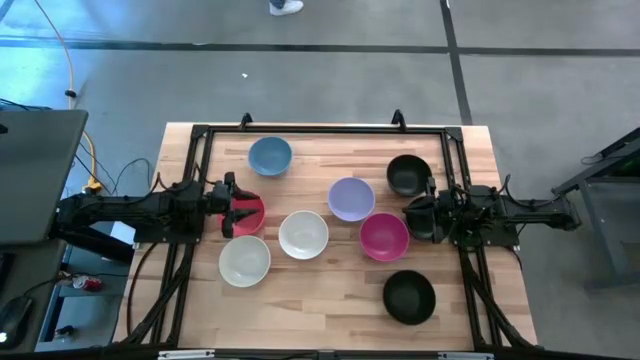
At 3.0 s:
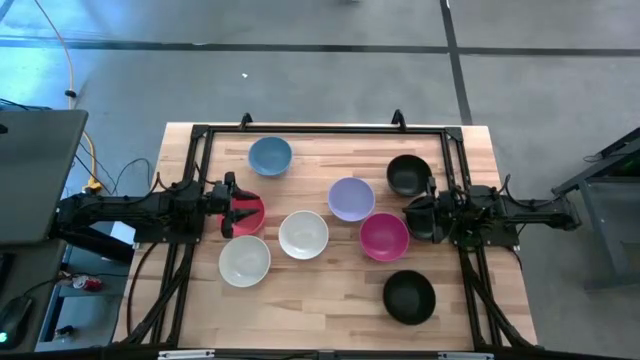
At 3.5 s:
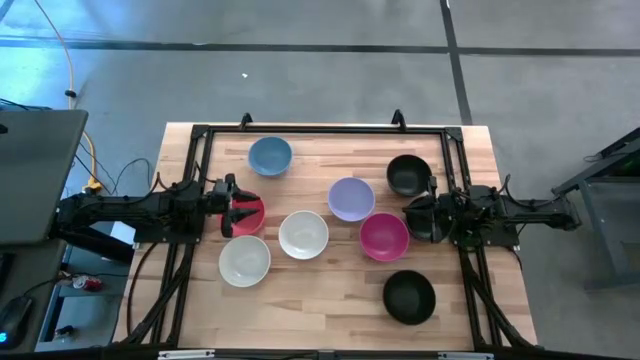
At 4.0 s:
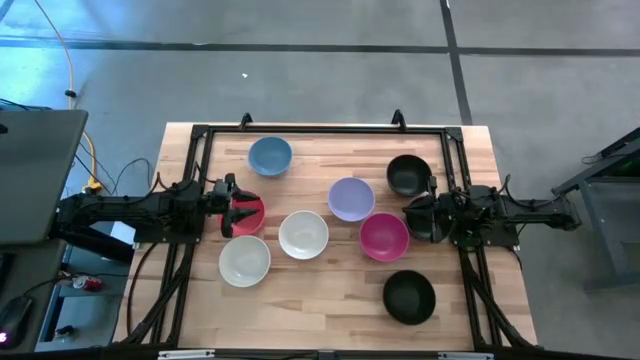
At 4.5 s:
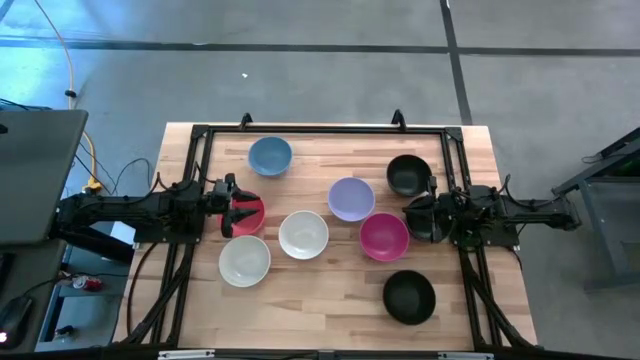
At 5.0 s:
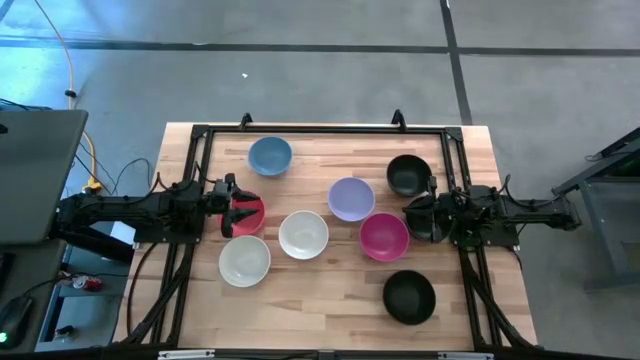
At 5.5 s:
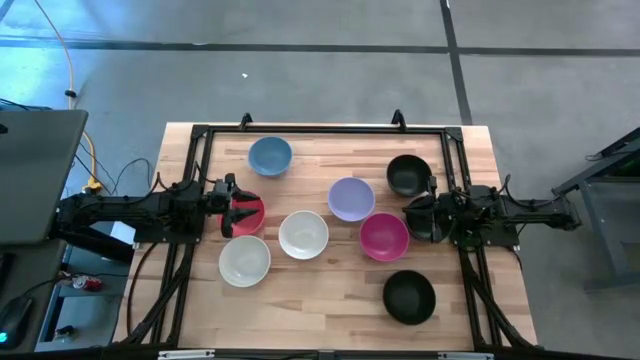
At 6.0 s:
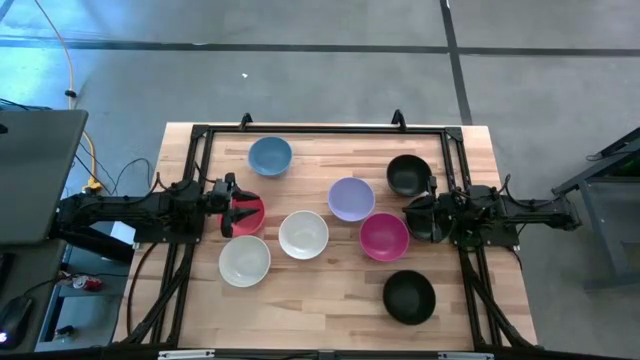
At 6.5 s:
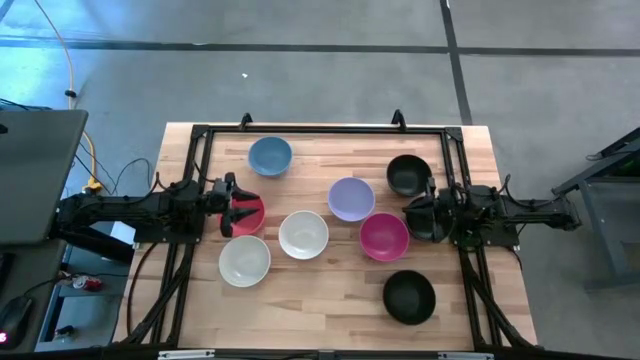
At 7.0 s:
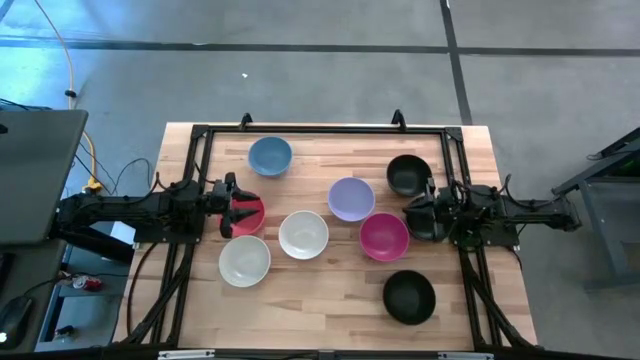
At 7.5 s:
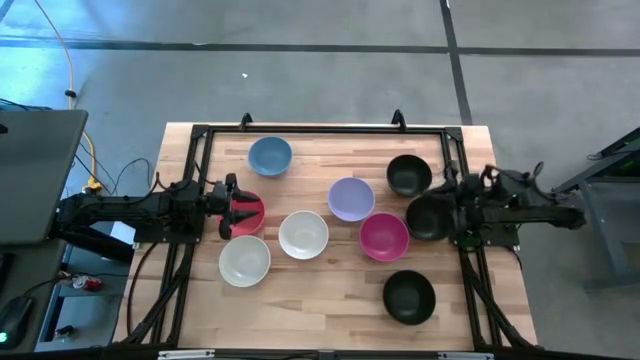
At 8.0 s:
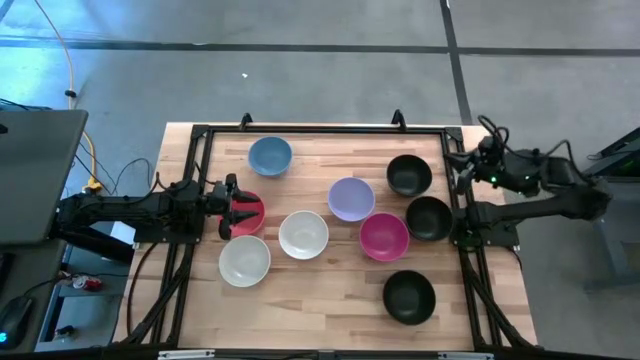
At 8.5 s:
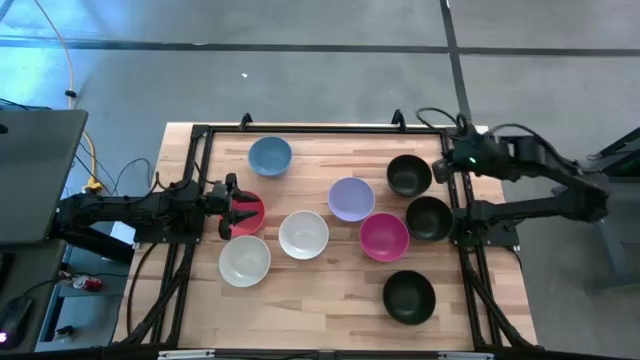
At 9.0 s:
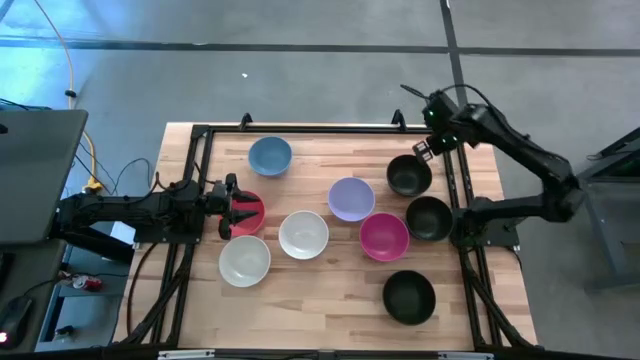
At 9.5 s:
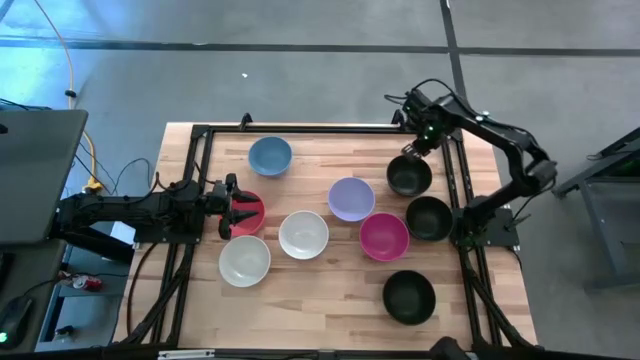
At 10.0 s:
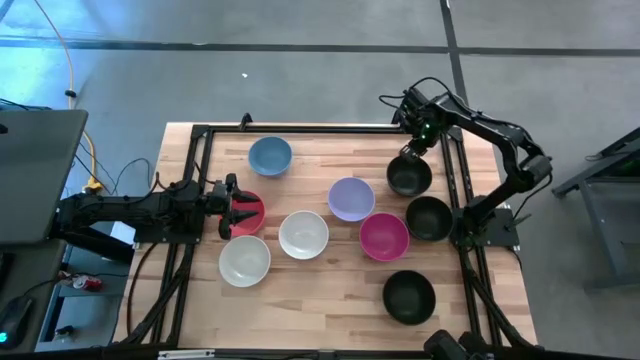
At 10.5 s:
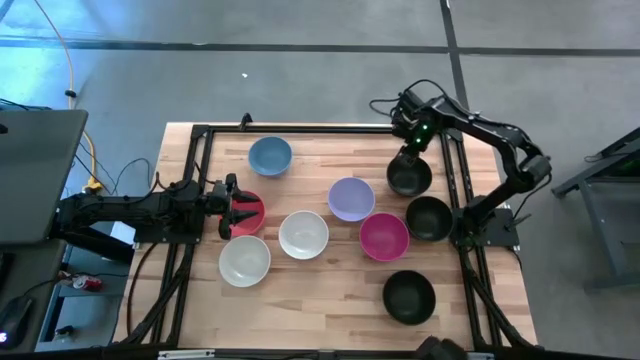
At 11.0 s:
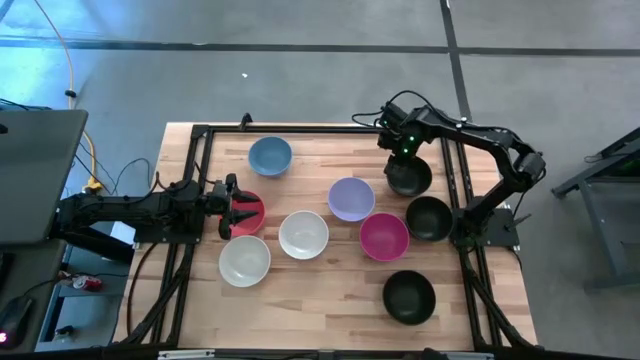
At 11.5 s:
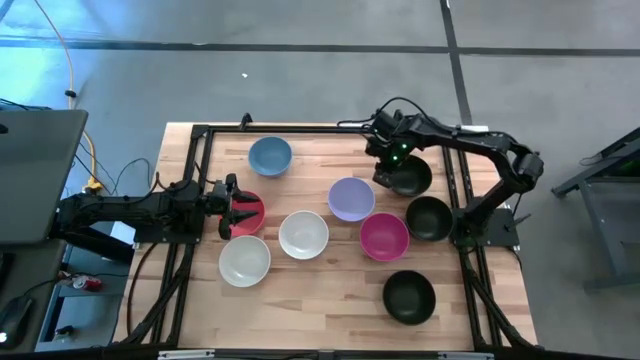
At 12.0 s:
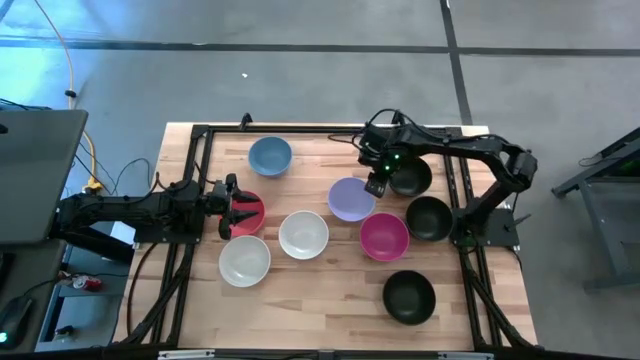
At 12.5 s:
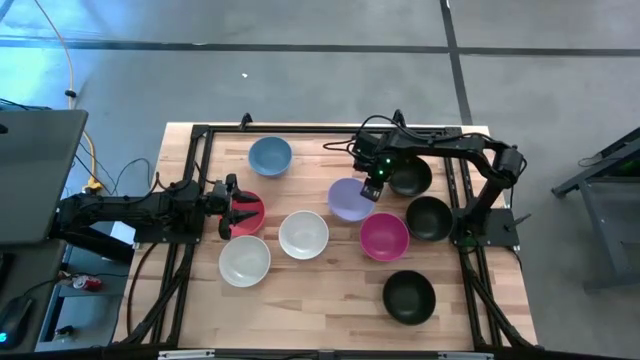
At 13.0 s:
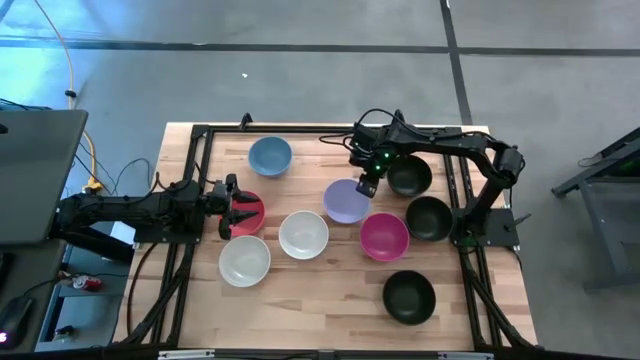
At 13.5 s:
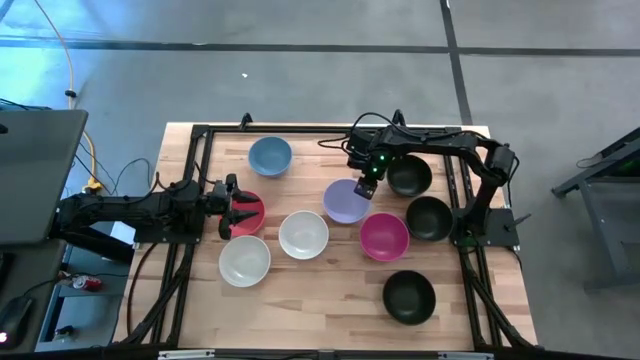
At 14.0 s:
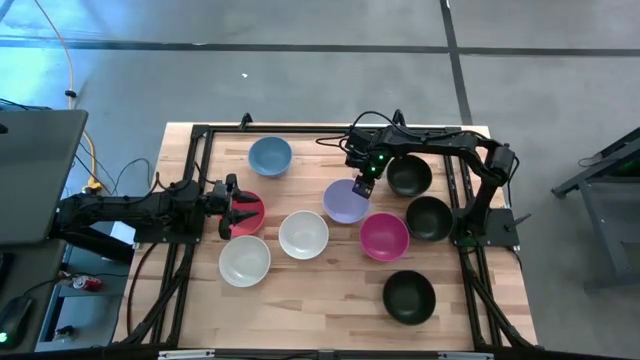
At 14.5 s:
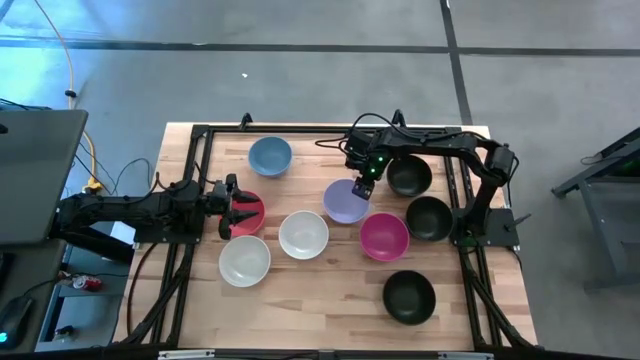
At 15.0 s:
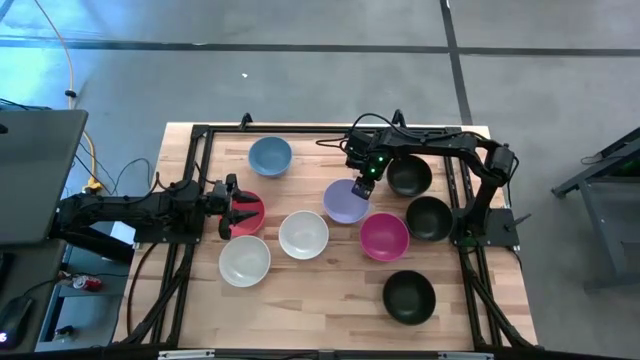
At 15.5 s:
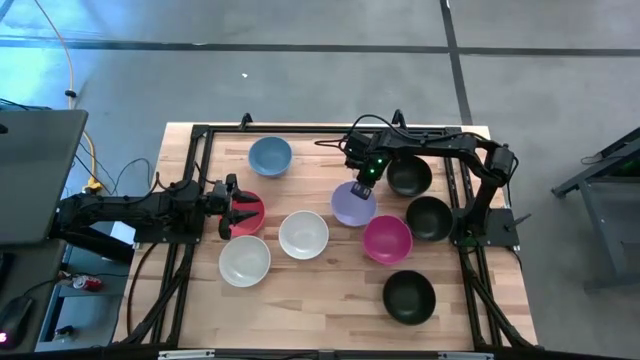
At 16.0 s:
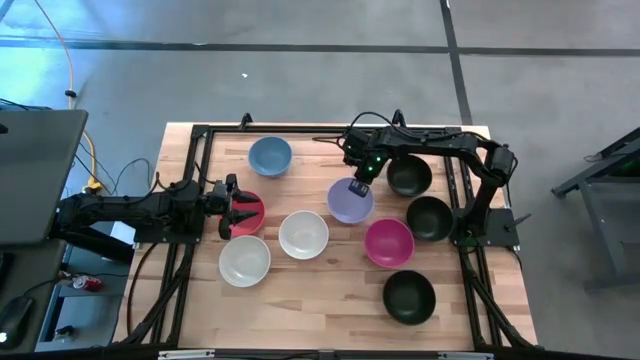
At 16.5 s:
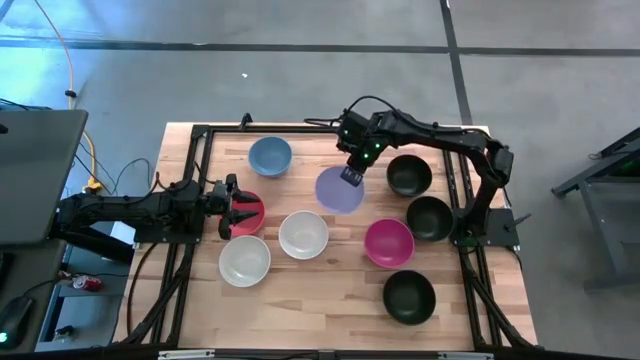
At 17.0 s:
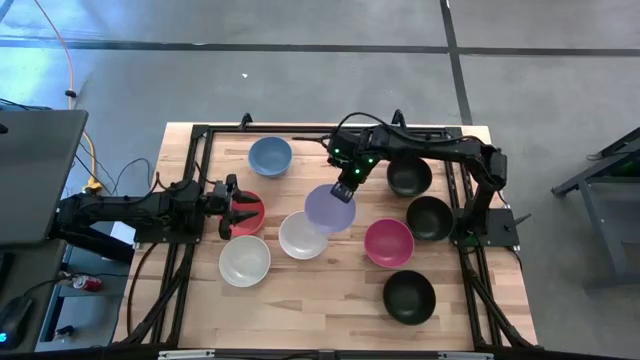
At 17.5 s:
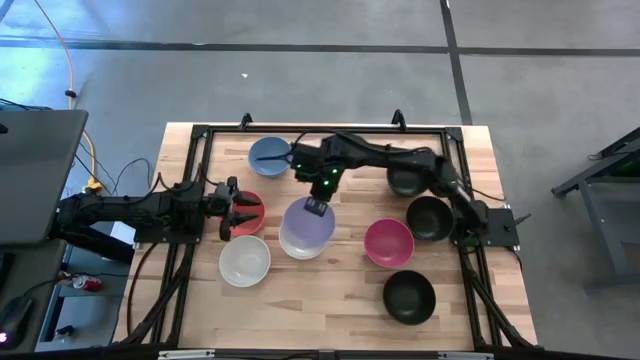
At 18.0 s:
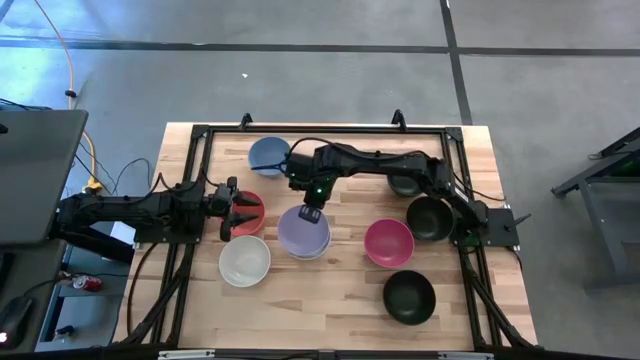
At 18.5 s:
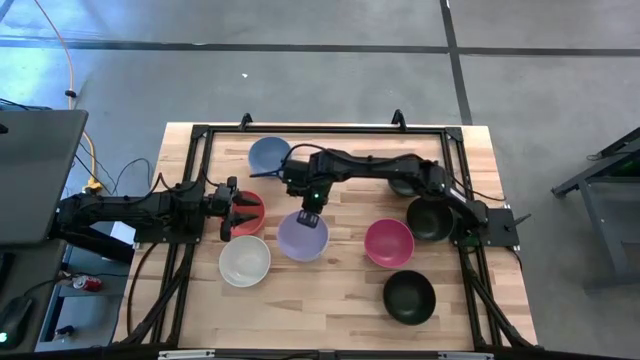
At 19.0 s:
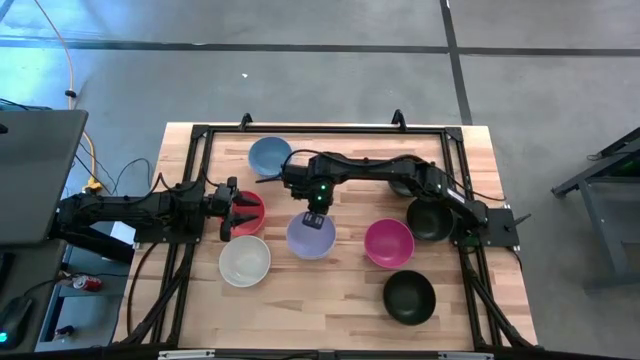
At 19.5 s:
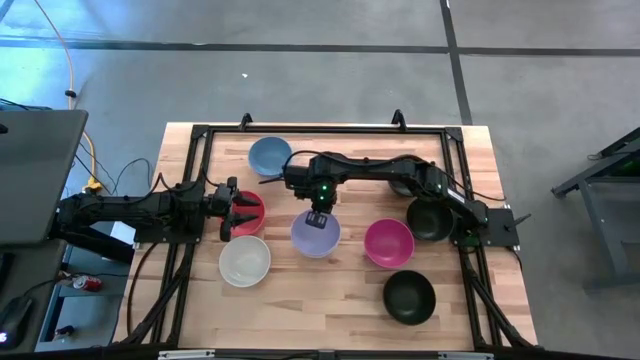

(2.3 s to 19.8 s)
Task: Nest bowls inside each other
Stack the purple bowl on top of the left white bowl

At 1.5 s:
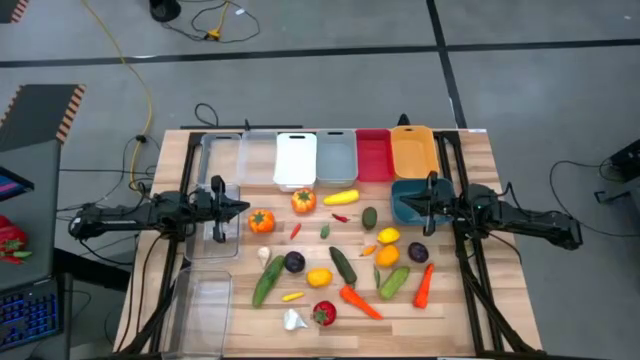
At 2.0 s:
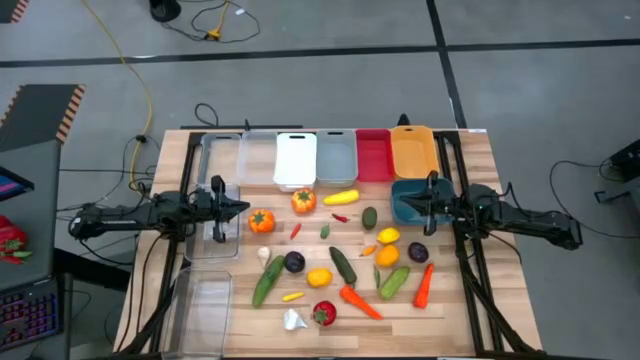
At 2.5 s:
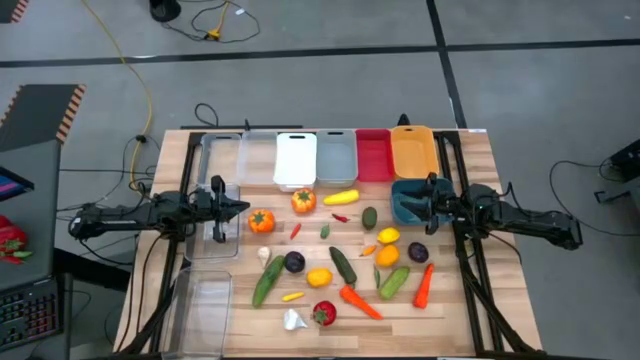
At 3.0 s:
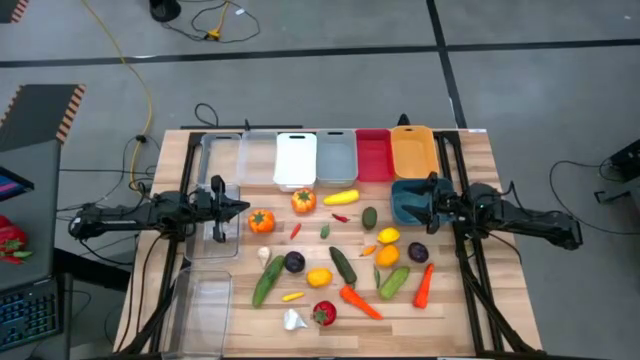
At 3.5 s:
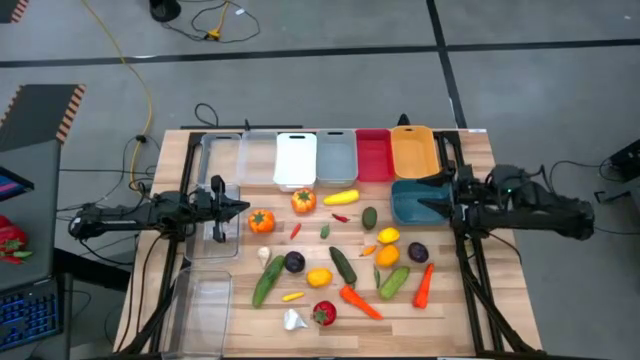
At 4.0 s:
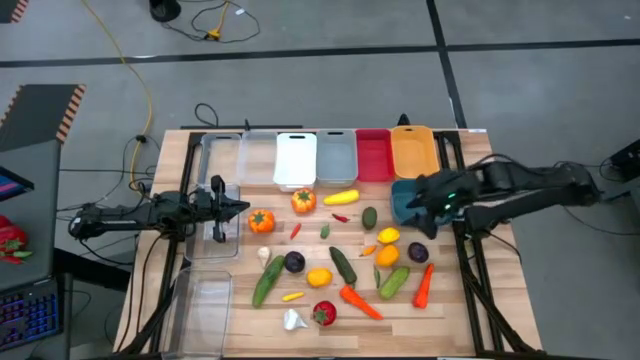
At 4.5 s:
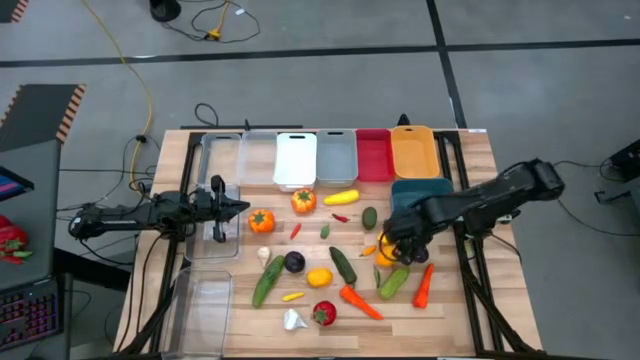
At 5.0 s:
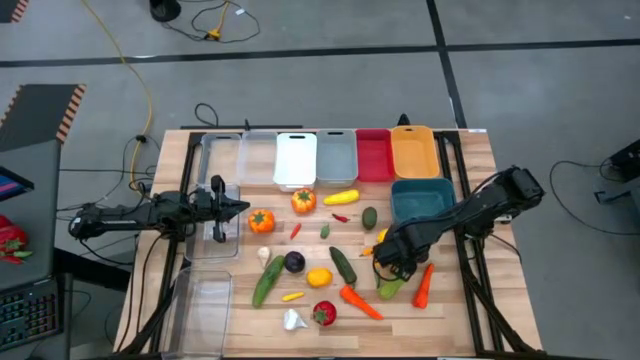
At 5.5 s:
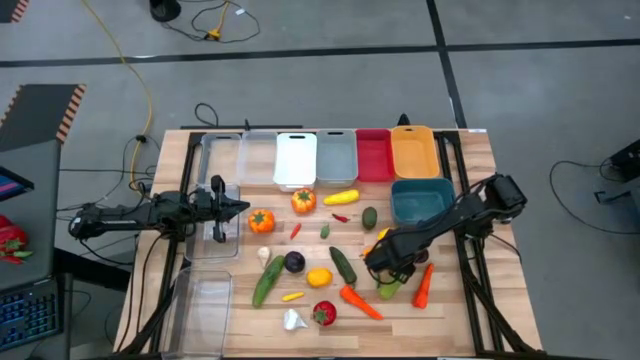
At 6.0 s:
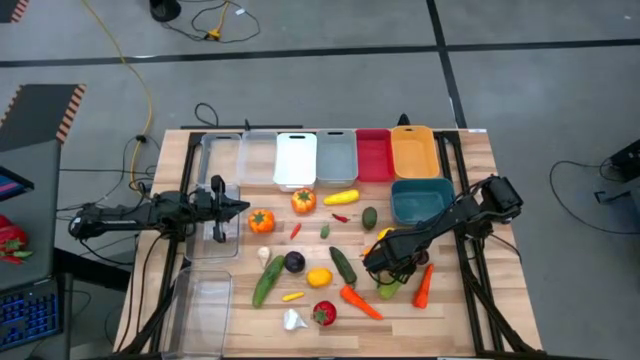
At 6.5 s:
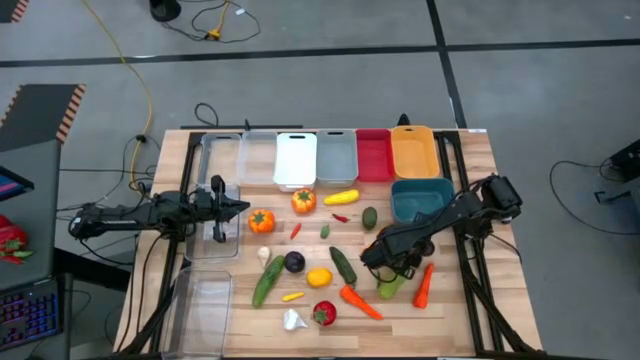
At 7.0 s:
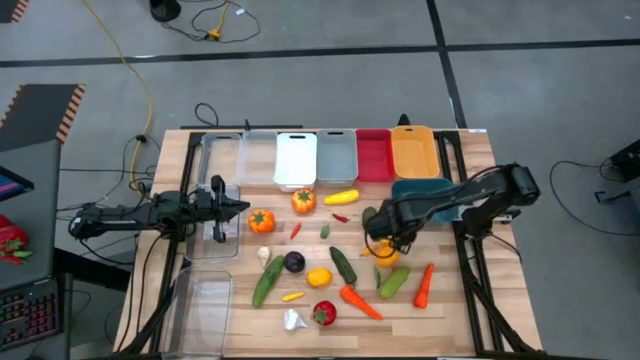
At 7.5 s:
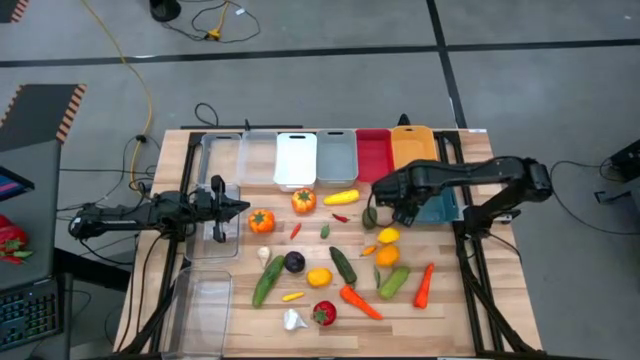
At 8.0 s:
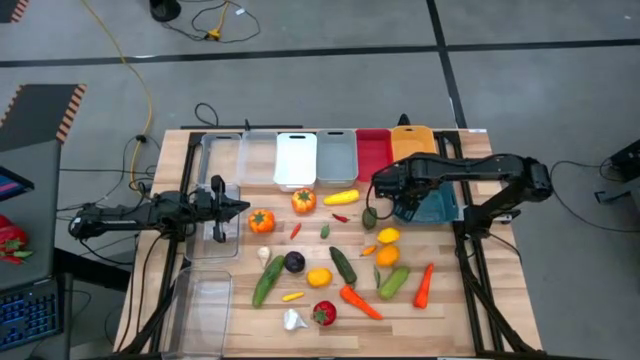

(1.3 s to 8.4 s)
Task: Sort produce into baskets
Put the right plum into the blue bin
